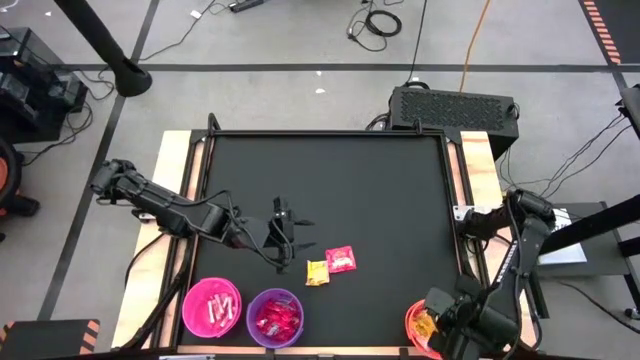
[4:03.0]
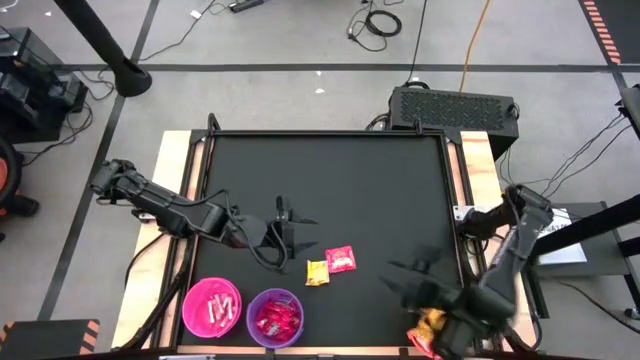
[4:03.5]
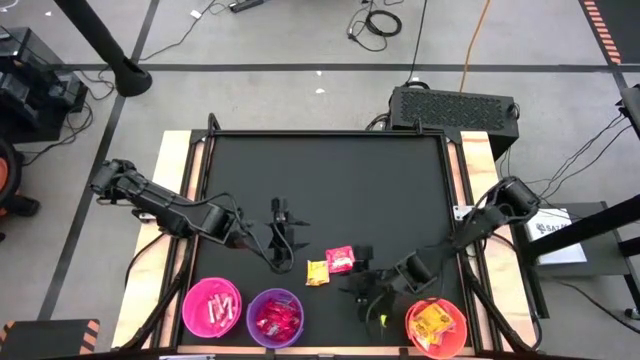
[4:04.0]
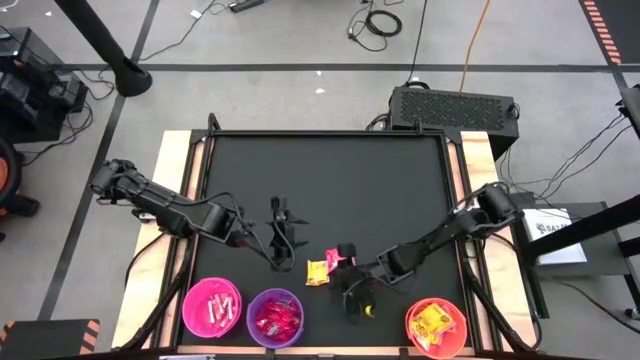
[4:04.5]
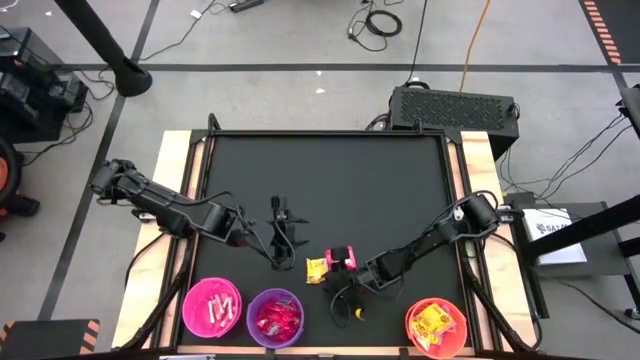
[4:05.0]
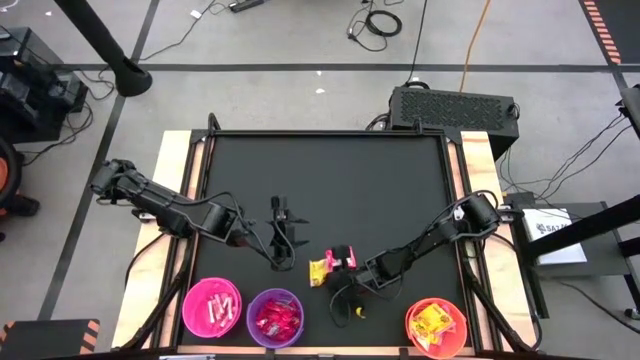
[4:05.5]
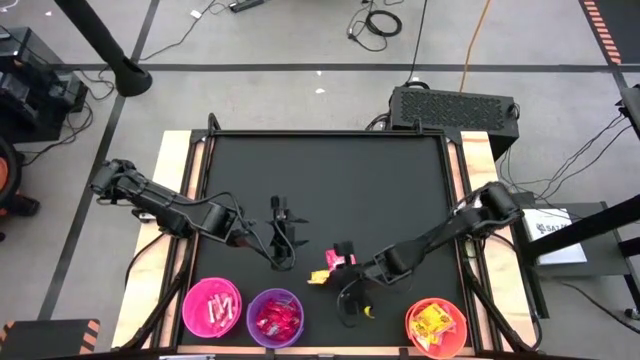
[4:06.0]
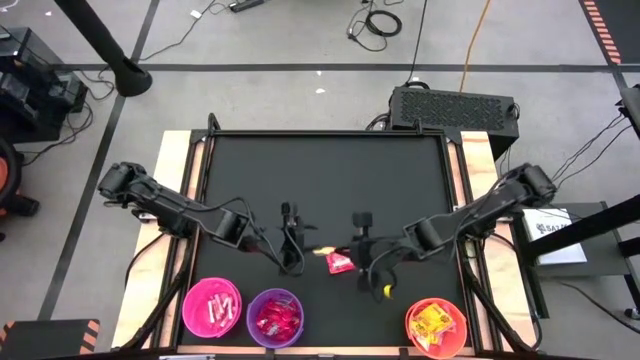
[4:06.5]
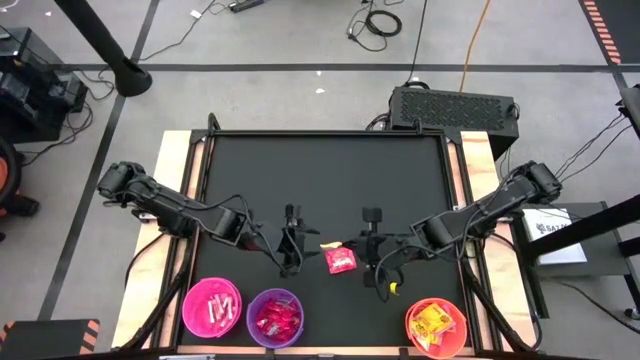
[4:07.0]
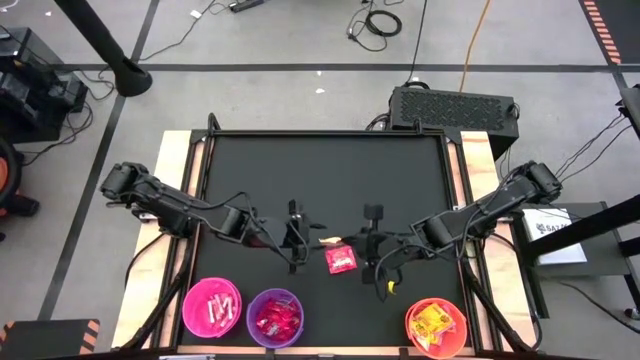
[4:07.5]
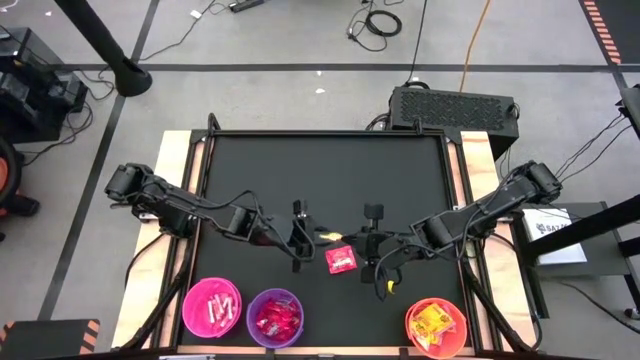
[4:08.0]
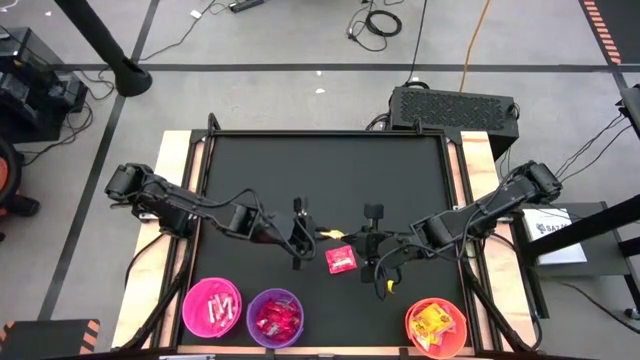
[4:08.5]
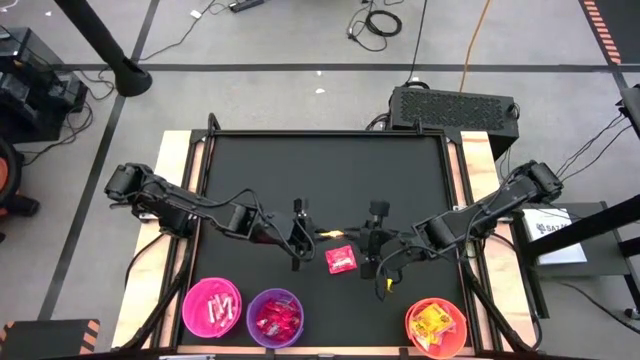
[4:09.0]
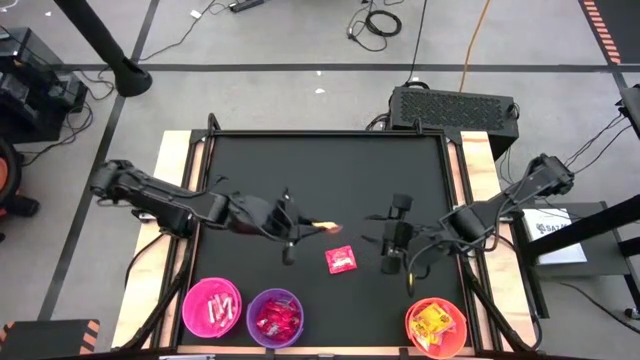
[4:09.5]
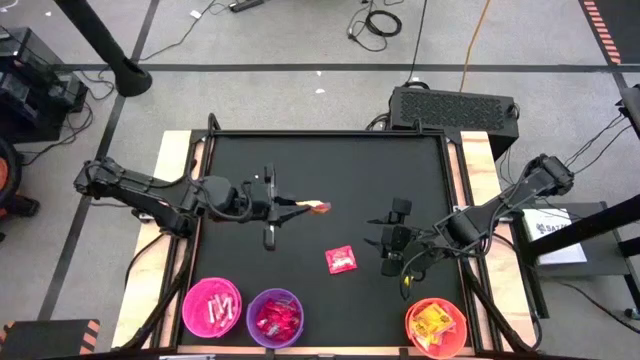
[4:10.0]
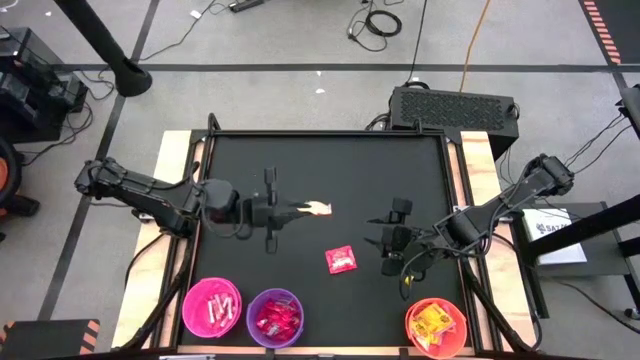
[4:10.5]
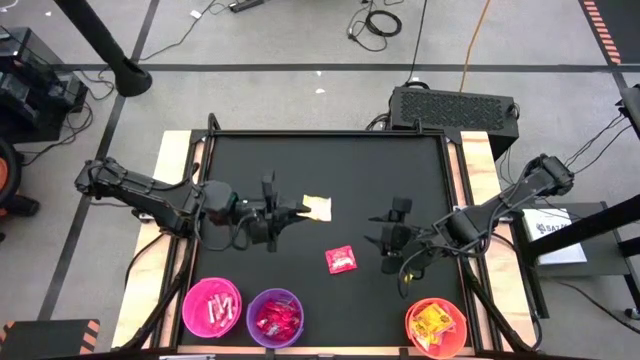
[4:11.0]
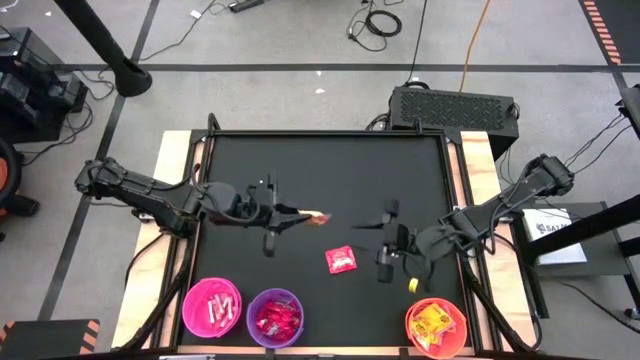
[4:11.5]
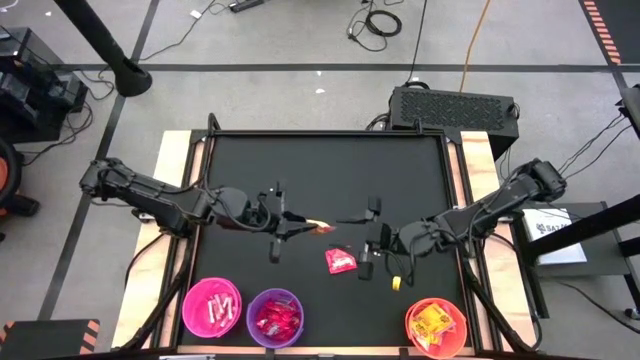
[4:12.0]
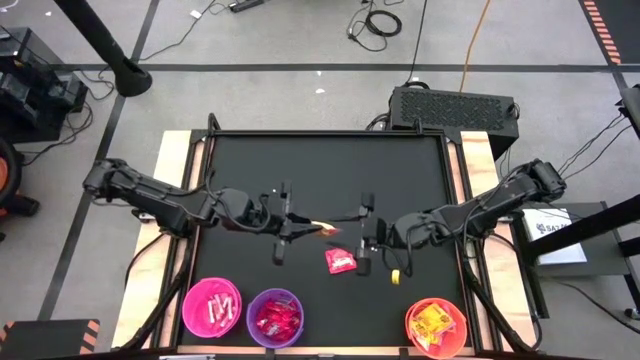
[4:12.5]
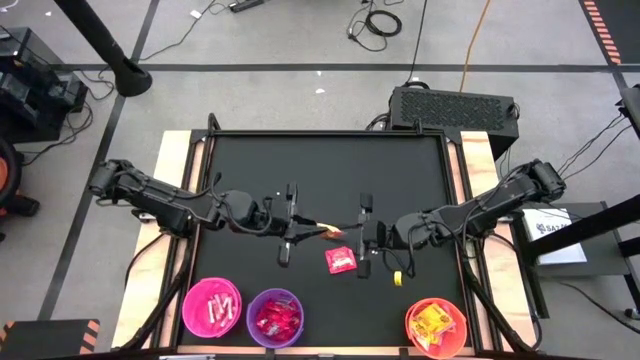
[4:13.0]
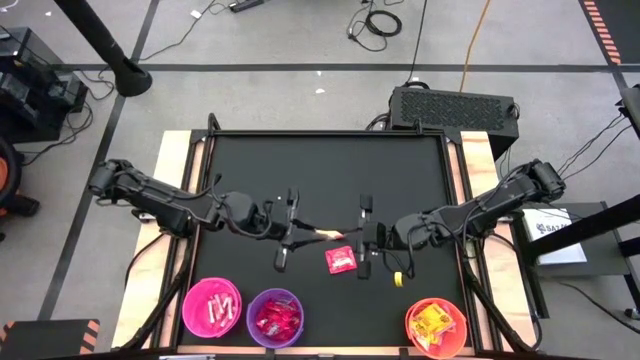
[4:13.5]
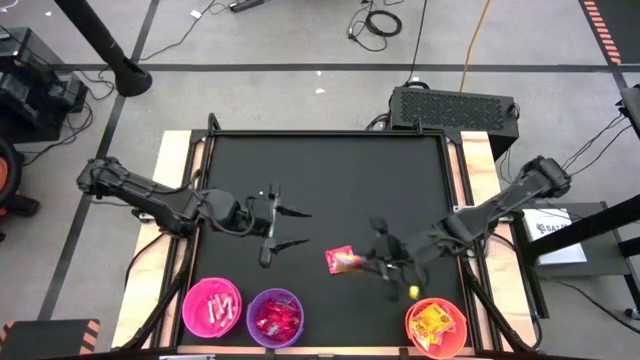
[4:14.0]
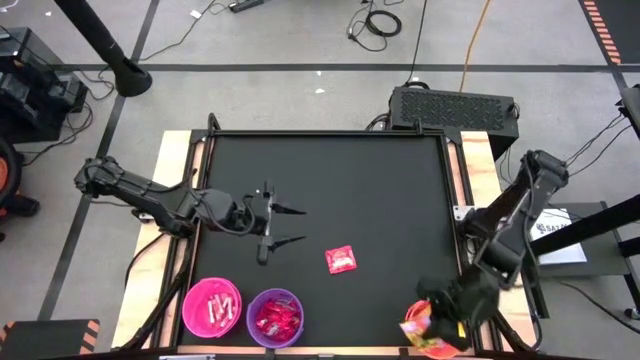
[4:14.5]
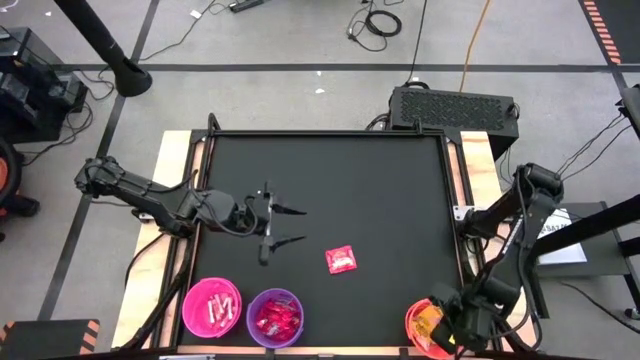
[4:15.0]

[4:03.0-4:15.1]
Task: Sort candy by brand, put in halloween buckets
Put the yellow candy into the orange bucket

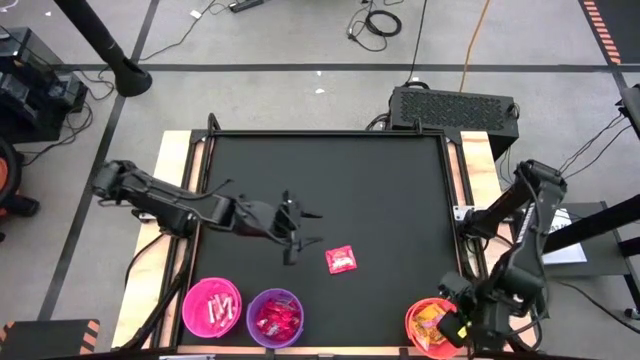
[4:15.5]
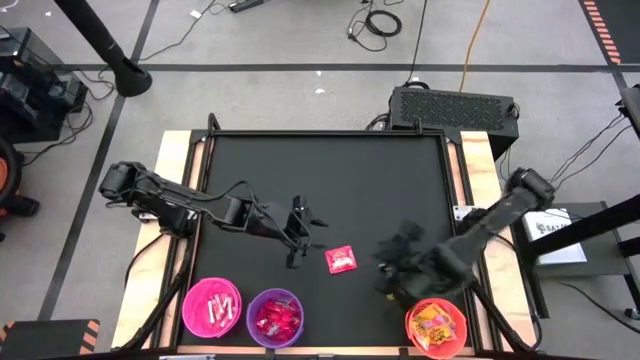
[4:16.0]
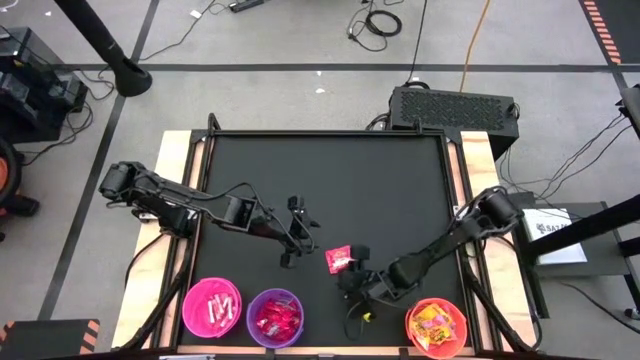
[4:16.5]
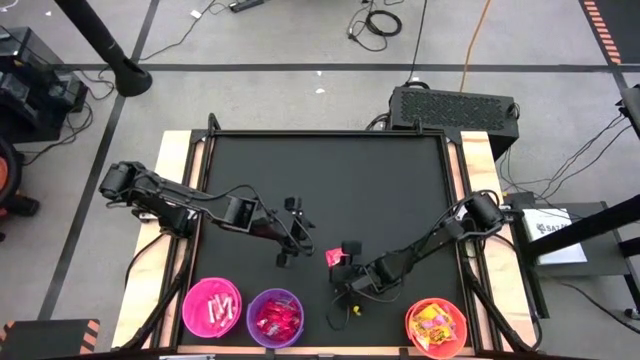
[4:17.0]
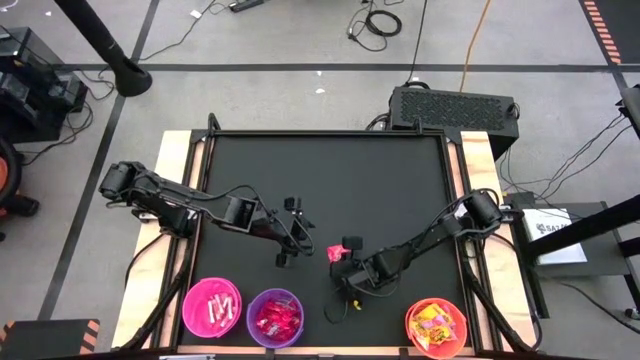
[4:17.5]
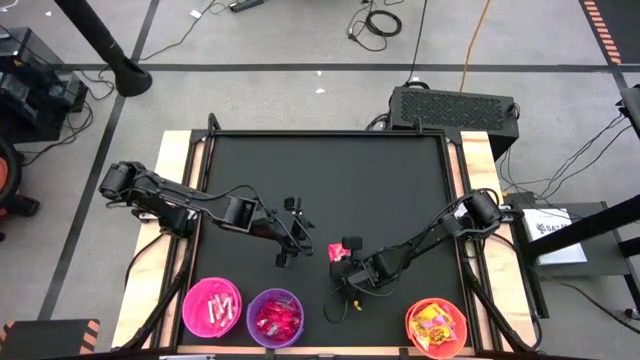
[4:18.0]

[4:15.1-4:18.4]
Put the red candy into the violet bucket

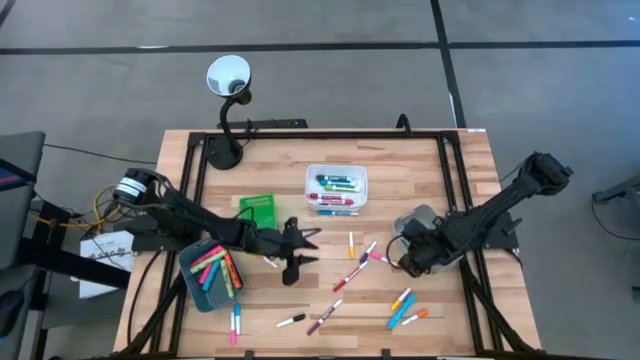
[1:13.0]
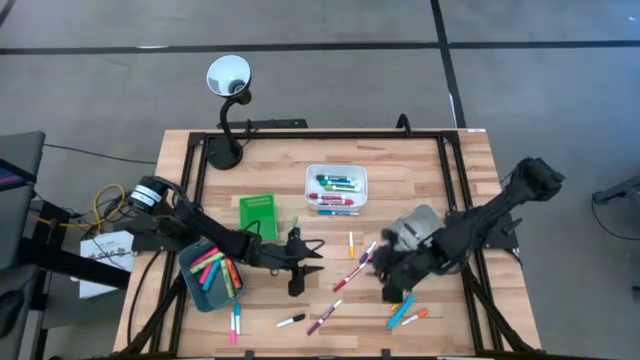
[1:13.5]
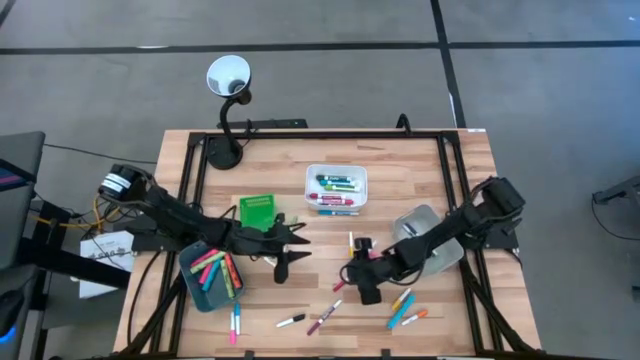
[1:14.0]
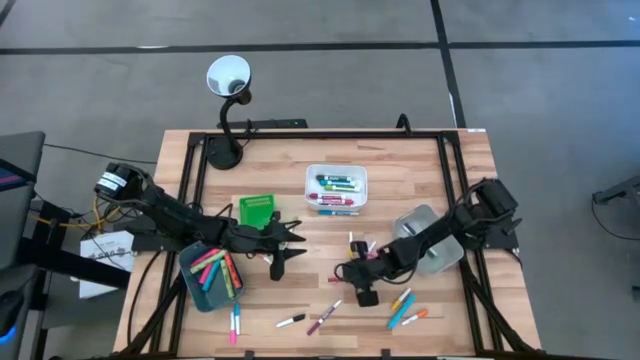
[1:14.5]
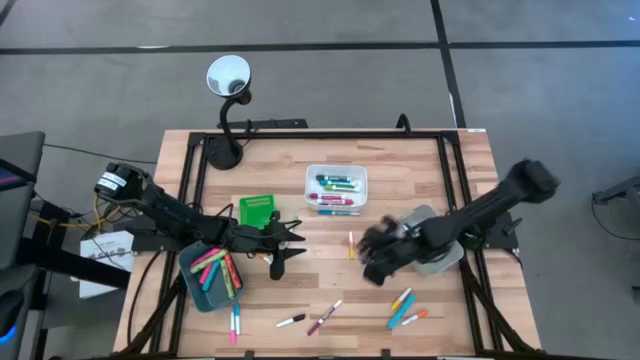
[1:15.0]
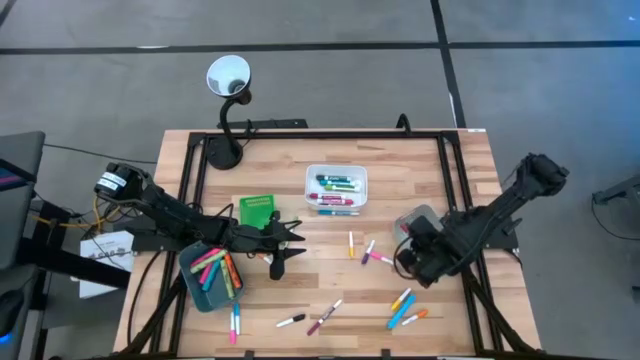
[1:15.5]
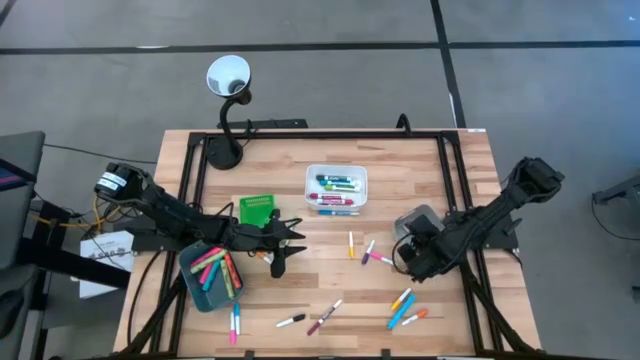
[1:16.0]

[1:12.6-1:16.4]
Task: Pick & Place Markers
Put the small red marker pen into the gray bin

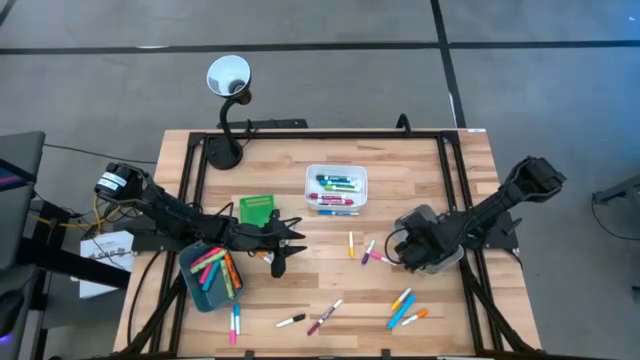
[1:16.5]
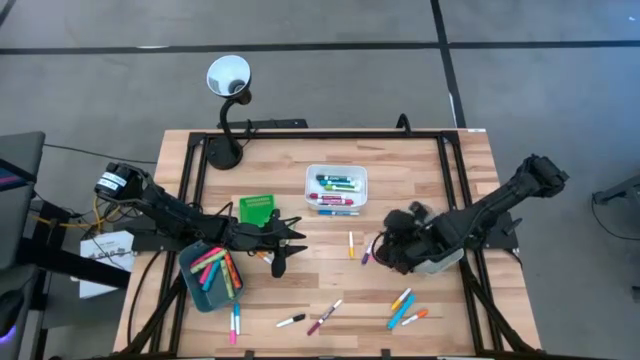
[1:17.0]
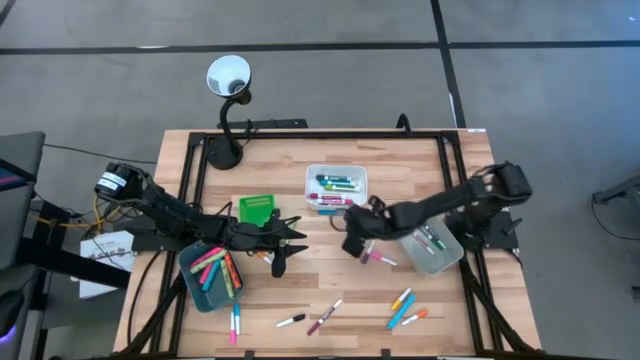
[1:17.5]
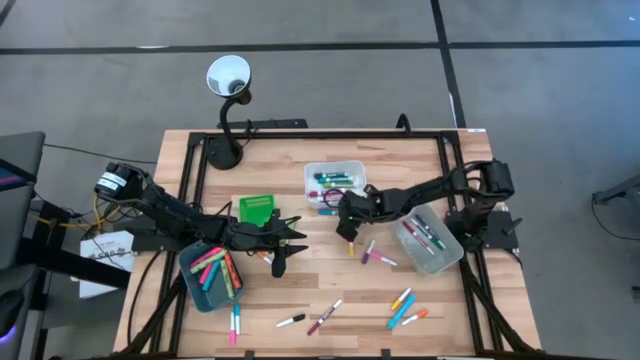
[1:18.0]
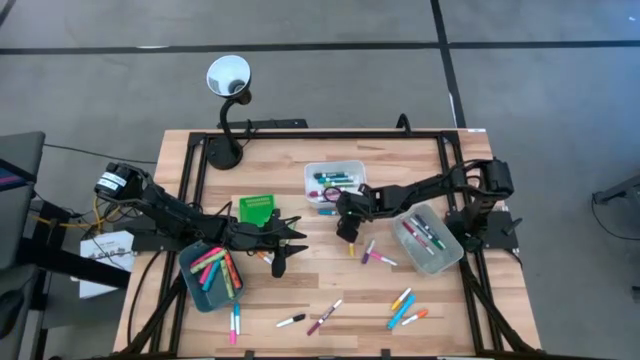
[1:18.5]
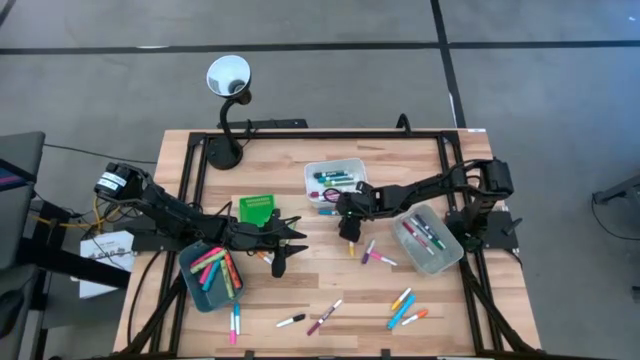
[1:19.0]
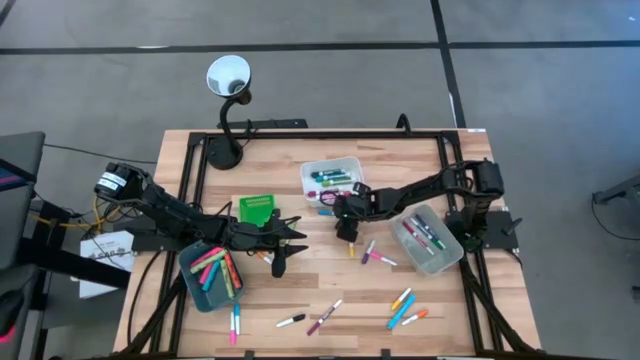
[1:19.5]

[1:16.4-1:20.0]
Put the small light blue marker pen into the gray bin
